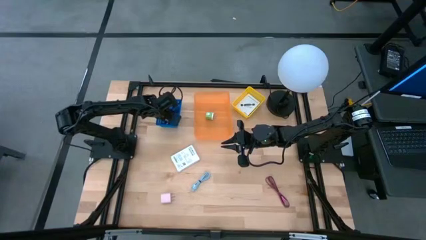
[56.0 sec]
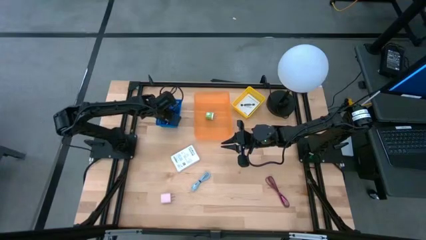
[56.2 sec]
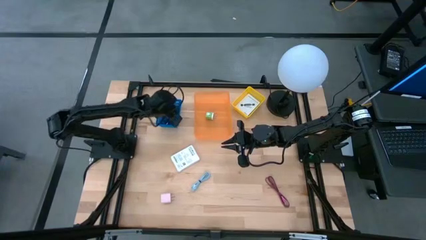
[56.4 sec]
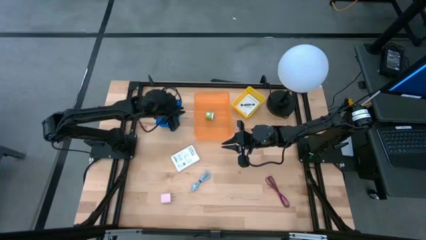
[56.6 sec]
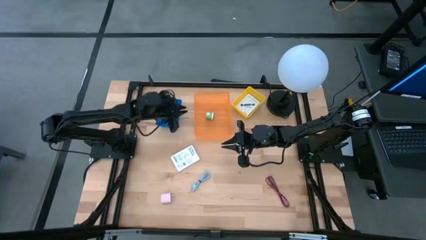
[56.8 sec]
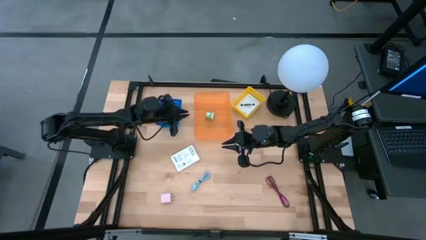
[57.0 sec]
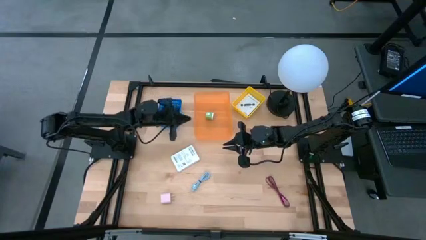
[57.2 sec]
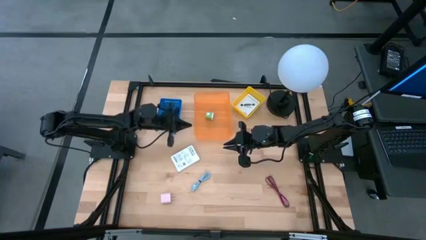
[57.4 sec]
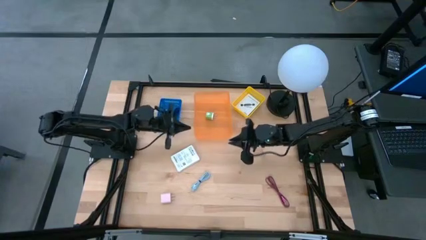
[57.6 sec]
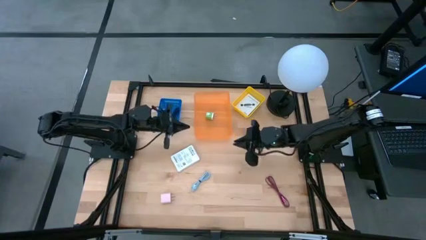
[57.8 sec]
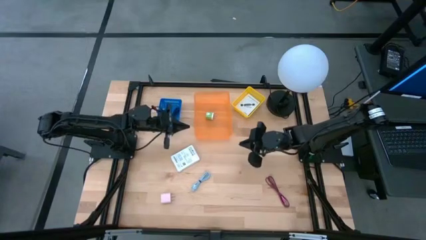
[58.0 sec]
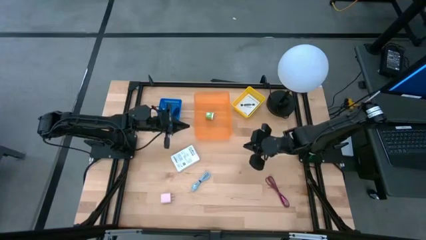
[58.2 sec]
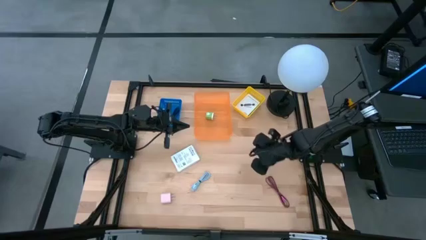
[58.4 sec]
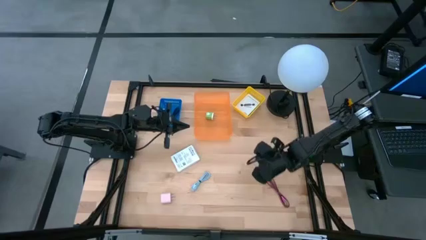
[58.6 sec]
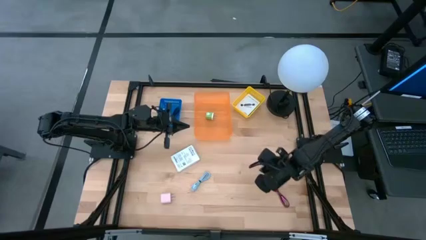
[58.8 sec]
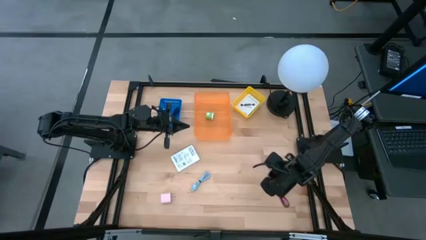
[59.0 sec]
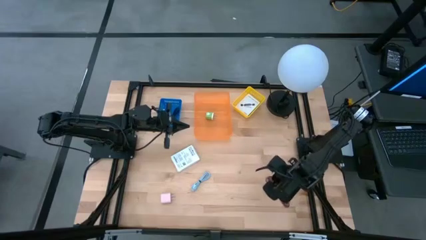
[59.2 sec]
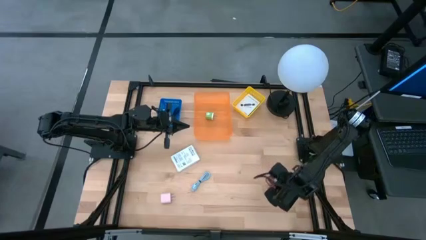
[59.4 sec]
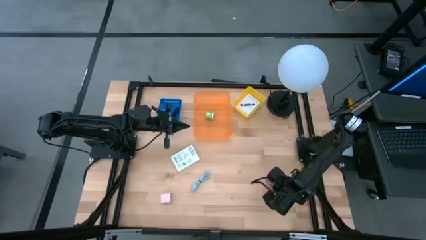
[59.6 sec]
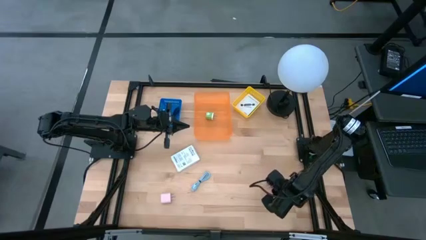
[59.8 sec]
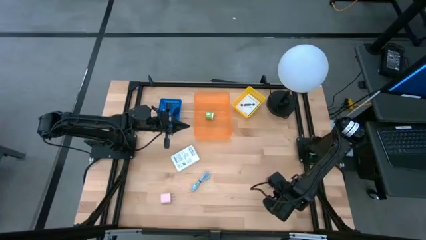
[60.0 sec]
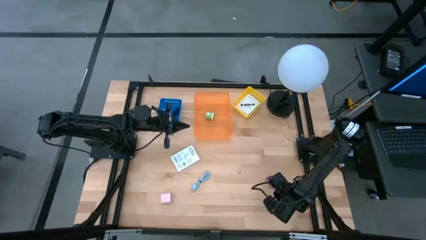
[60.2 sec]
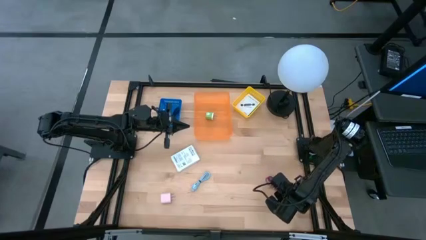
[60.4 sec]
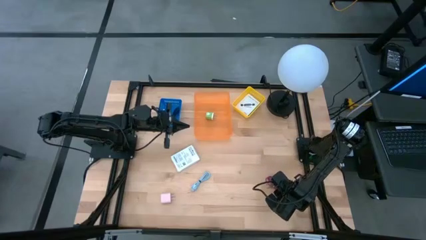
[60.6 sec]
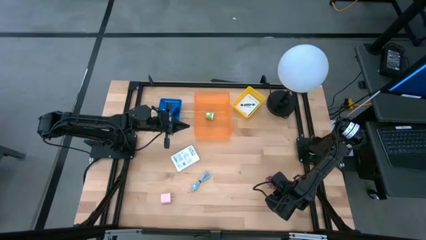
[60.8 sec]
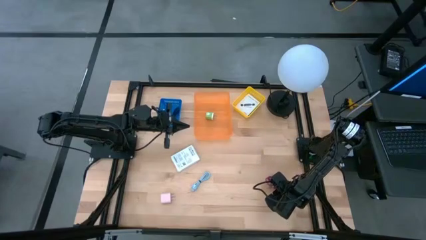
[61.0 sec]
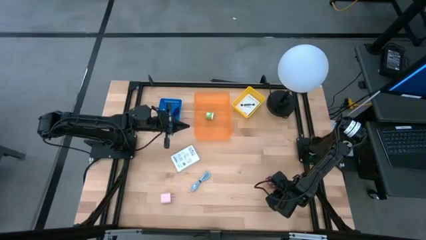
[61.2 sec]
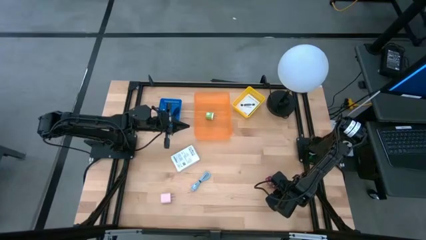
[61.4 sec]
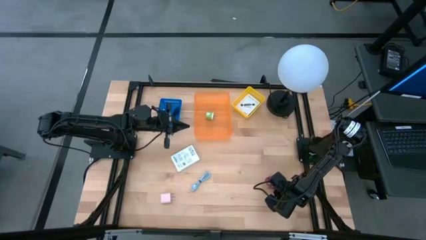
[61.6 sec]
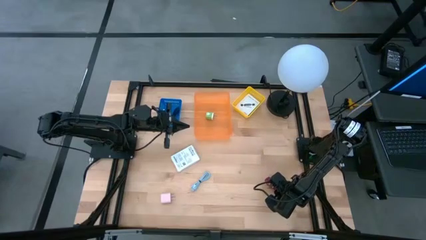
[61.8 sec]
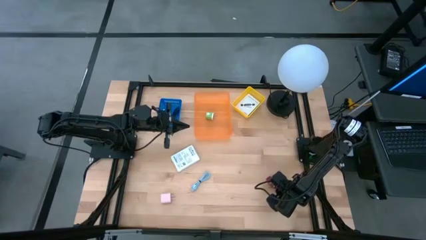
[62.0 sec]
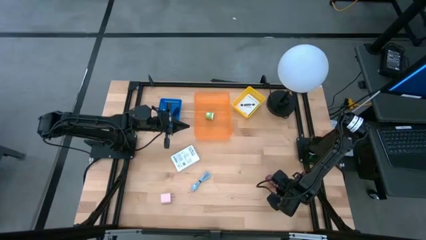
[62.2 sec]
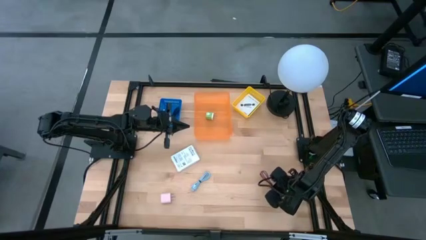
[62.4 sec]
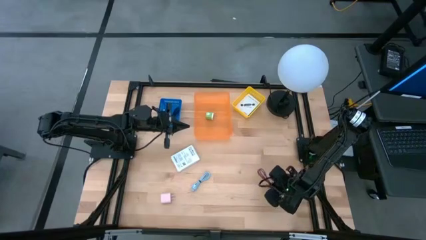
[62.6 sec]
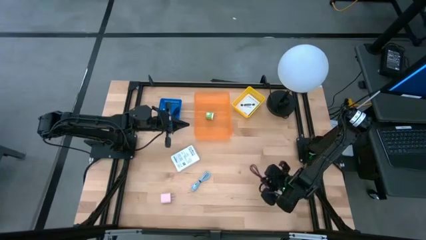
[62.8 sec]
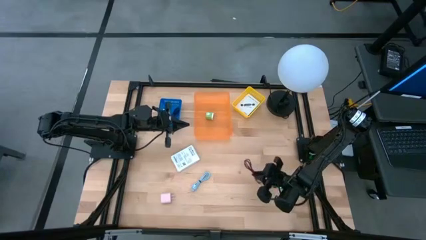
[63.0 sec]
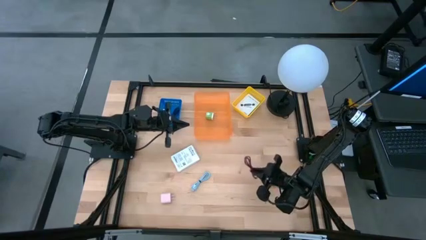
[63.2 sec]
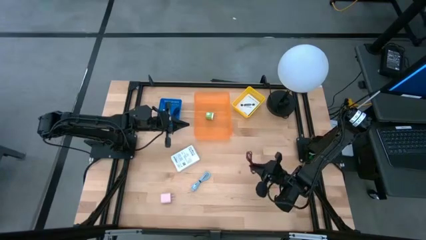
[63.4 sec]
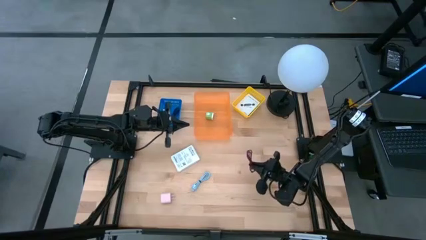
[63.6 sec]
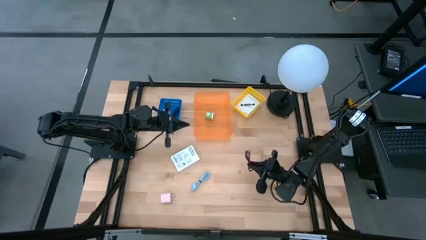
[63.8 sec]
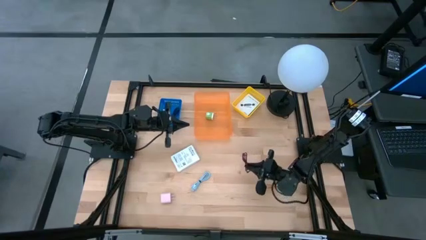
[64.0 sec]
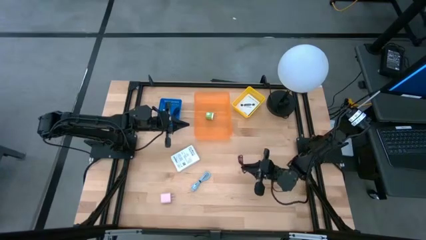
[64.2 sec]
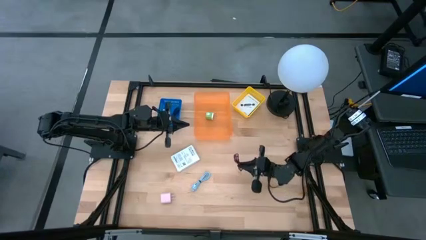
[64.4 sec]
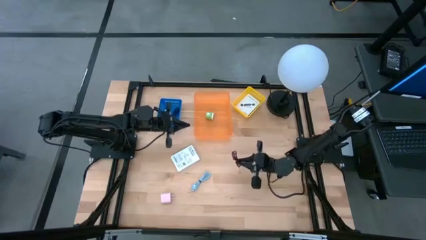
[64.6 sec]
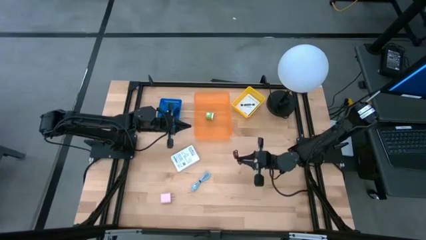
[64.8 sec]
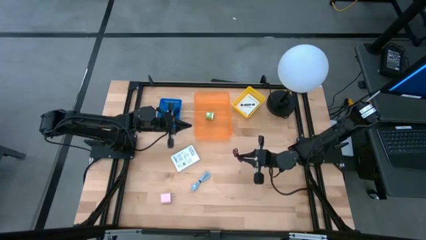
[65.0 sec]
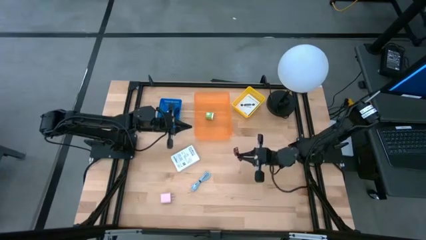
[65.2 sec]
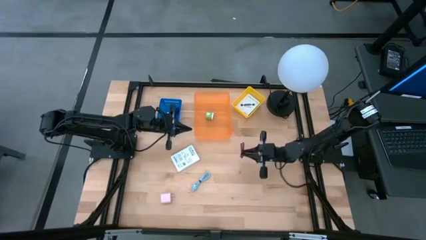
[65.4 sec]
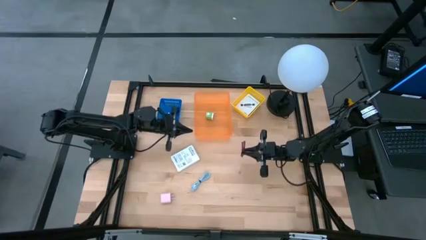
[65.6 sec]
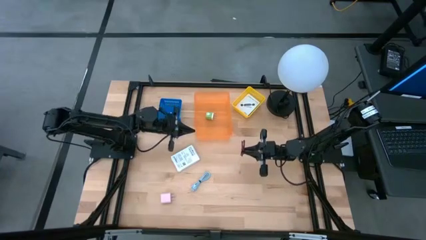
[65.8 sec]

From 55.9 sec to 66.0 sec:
Task: Pick and place items into bin
Put the pink USB cable wire into the blue basket
